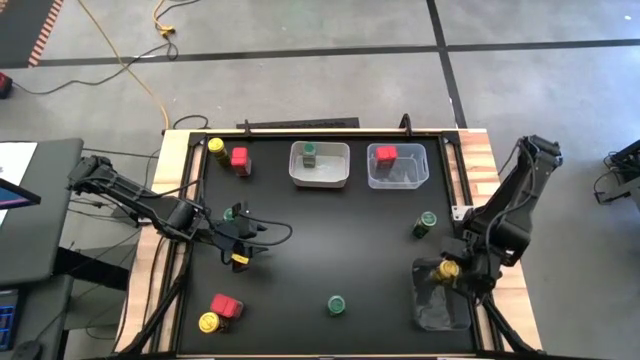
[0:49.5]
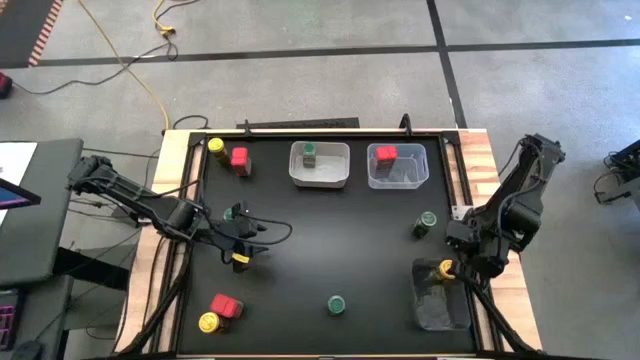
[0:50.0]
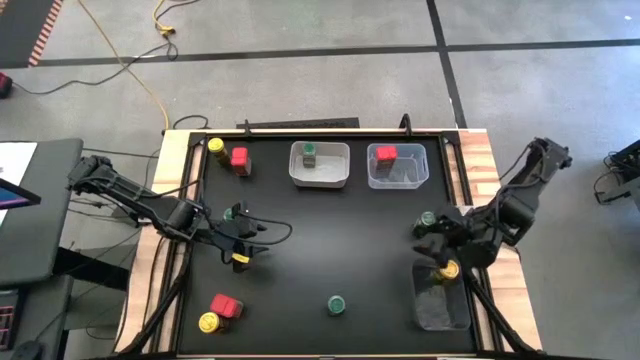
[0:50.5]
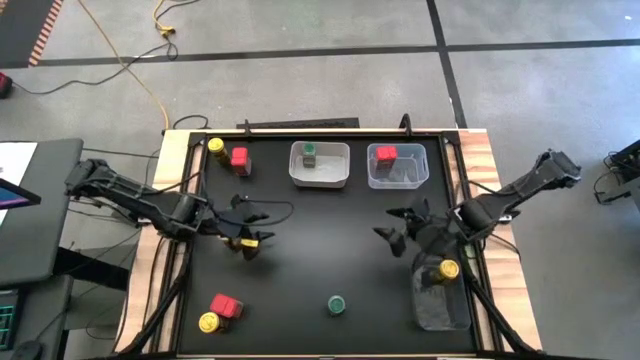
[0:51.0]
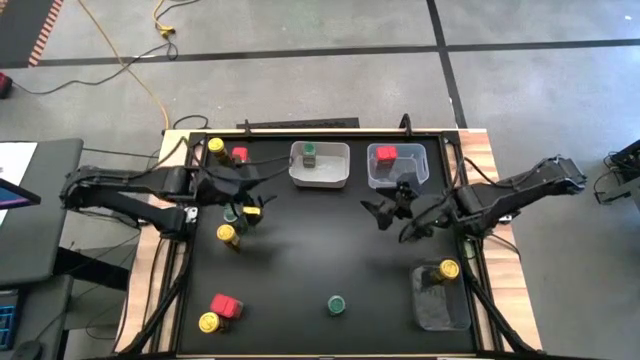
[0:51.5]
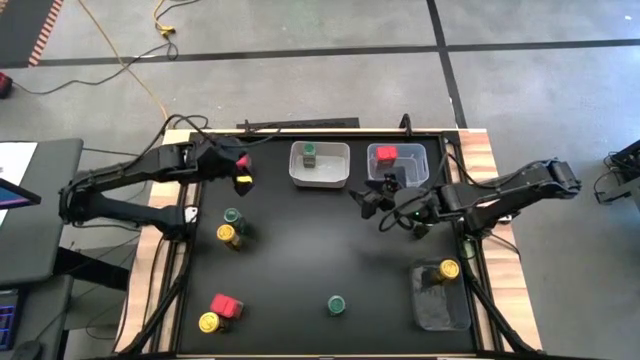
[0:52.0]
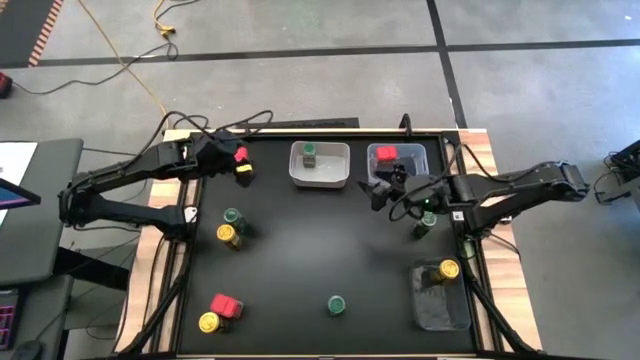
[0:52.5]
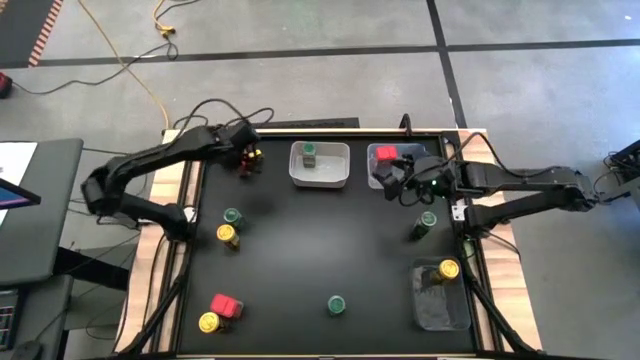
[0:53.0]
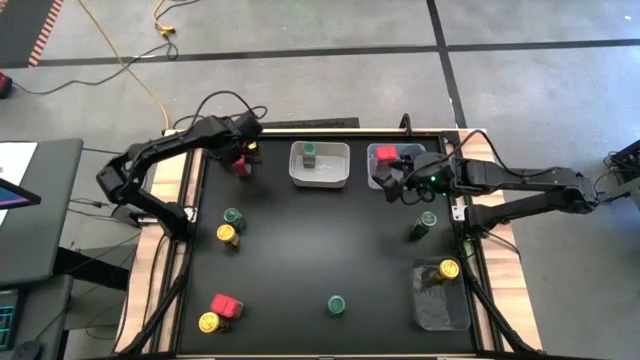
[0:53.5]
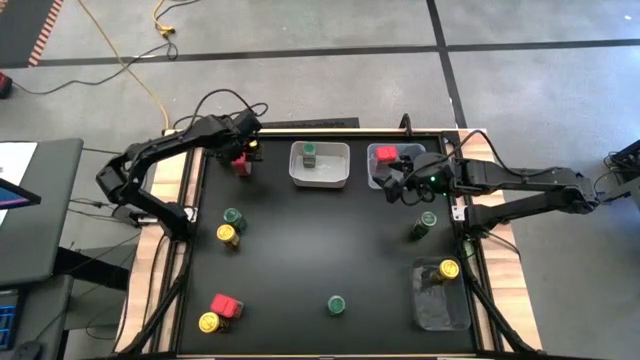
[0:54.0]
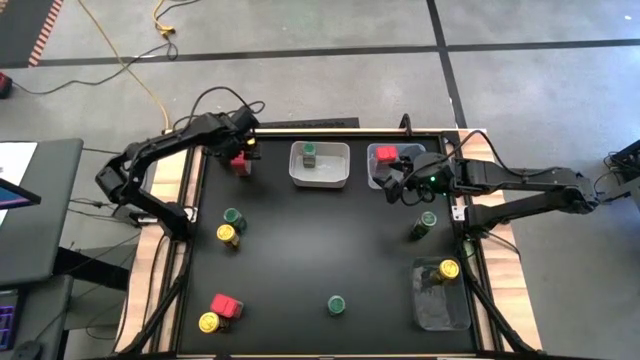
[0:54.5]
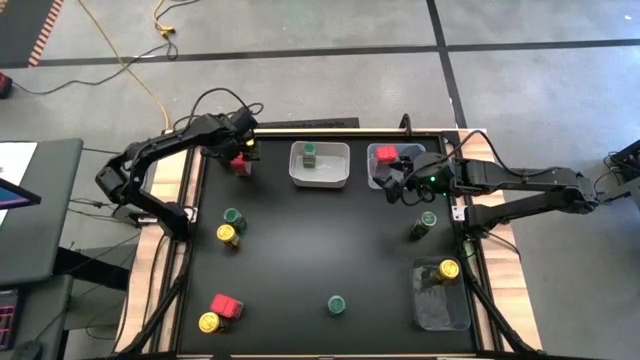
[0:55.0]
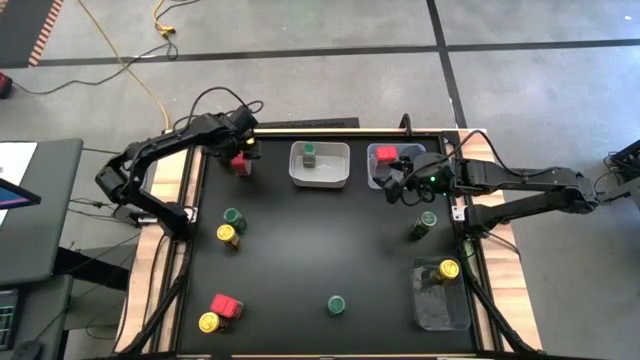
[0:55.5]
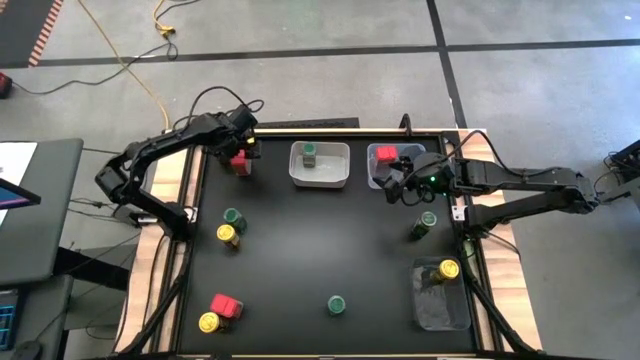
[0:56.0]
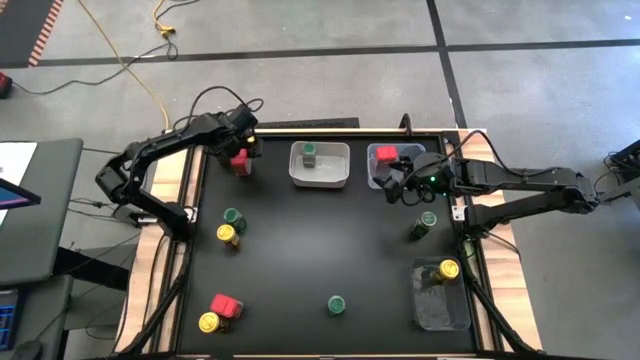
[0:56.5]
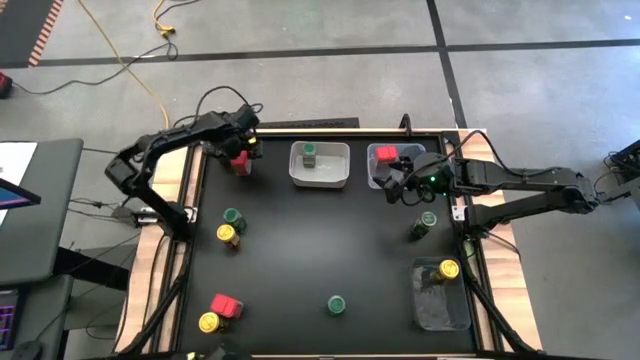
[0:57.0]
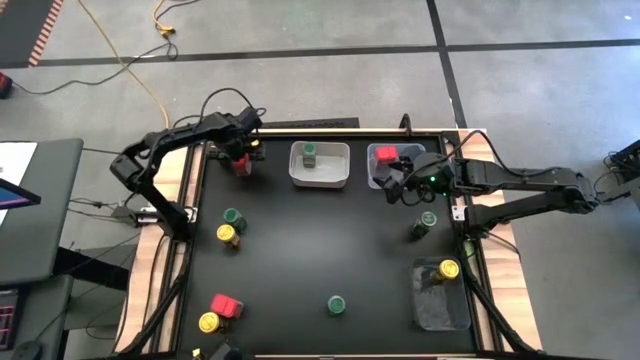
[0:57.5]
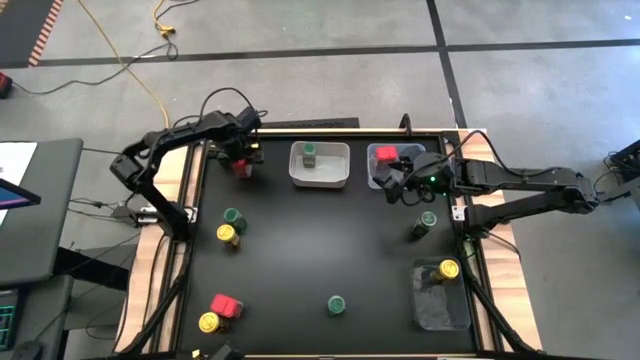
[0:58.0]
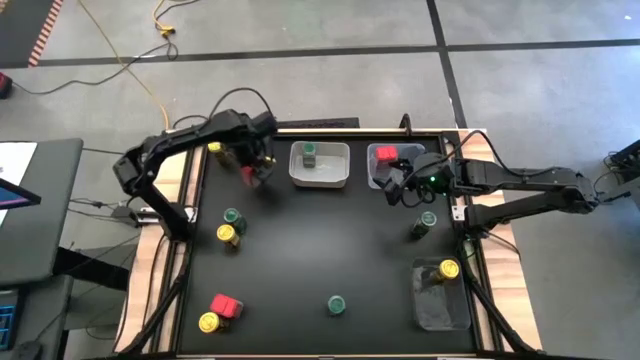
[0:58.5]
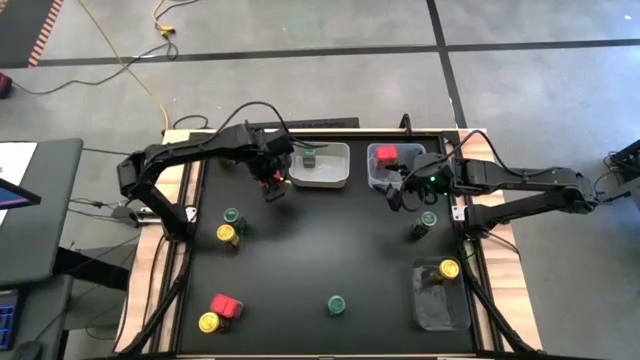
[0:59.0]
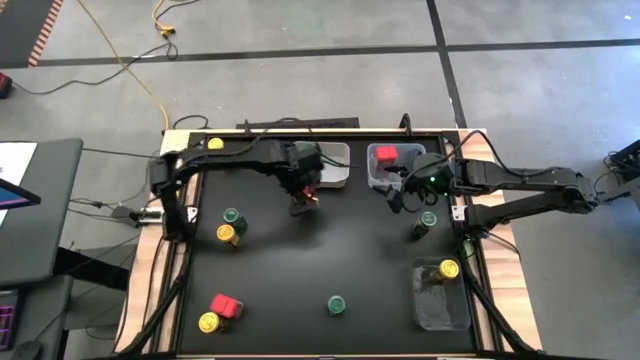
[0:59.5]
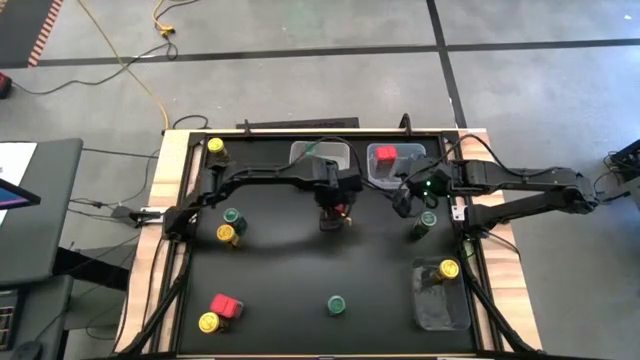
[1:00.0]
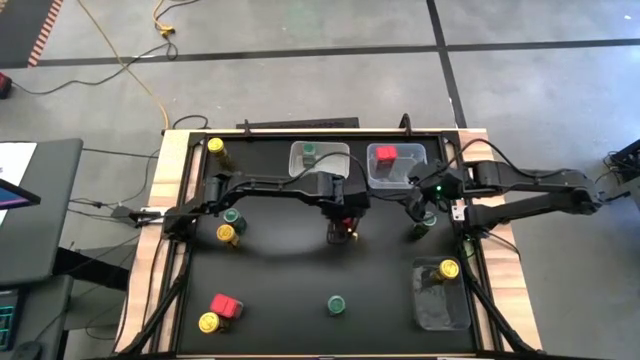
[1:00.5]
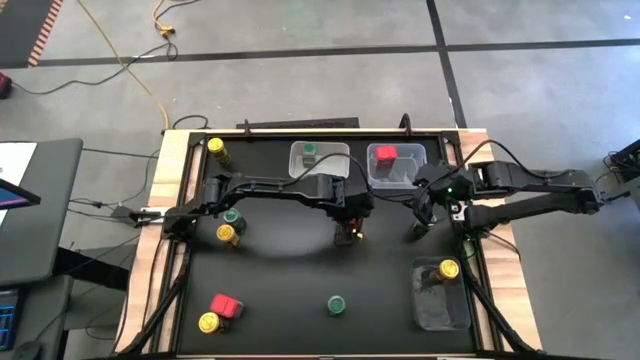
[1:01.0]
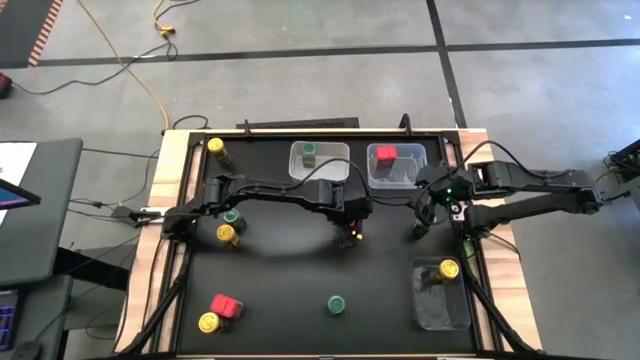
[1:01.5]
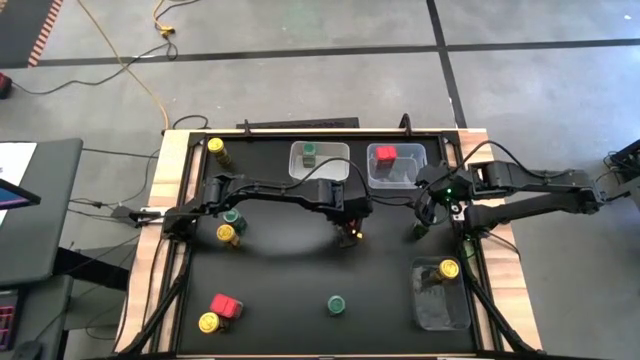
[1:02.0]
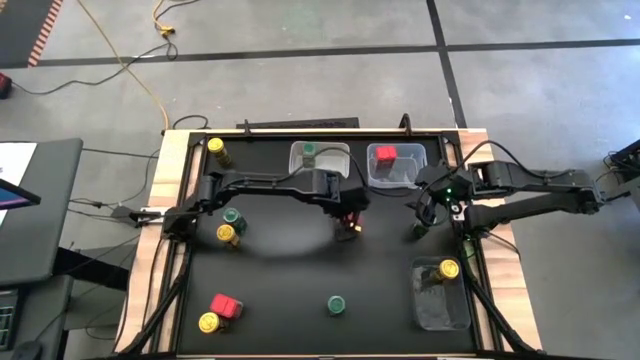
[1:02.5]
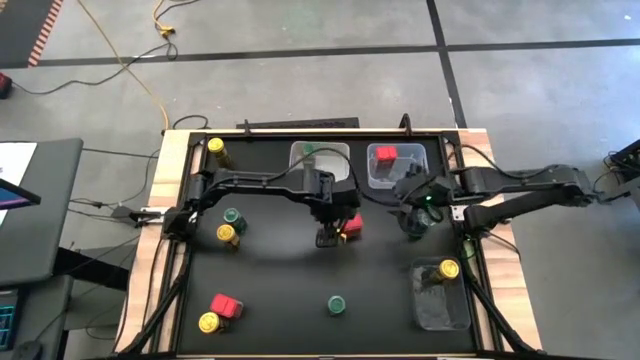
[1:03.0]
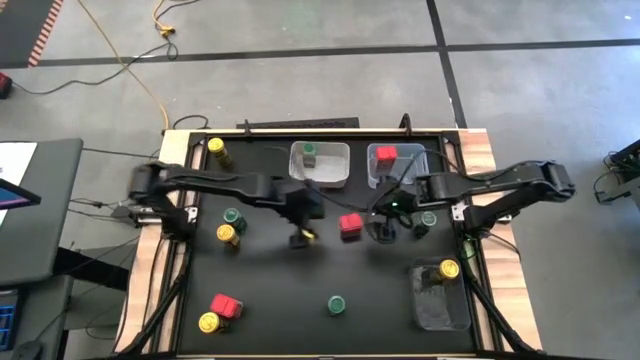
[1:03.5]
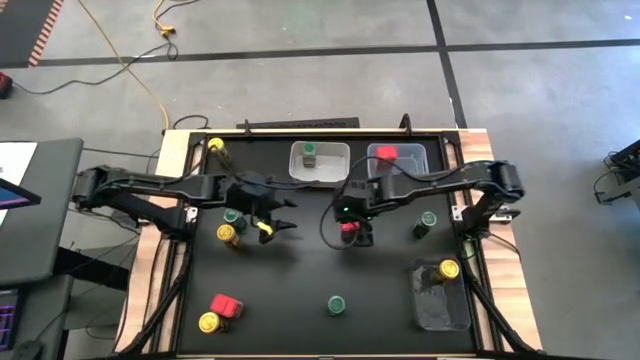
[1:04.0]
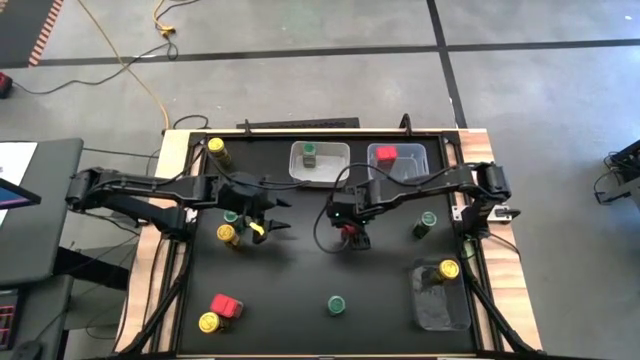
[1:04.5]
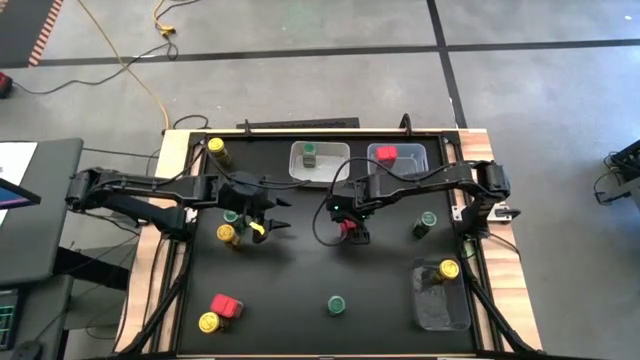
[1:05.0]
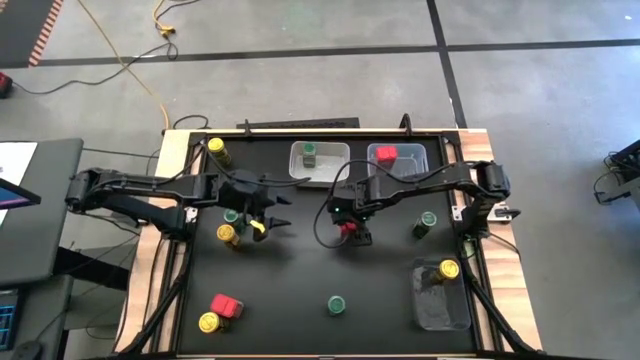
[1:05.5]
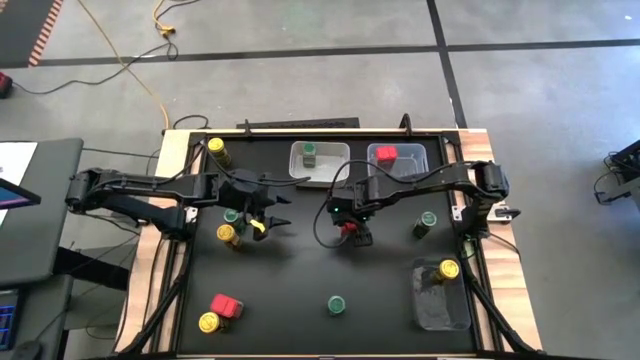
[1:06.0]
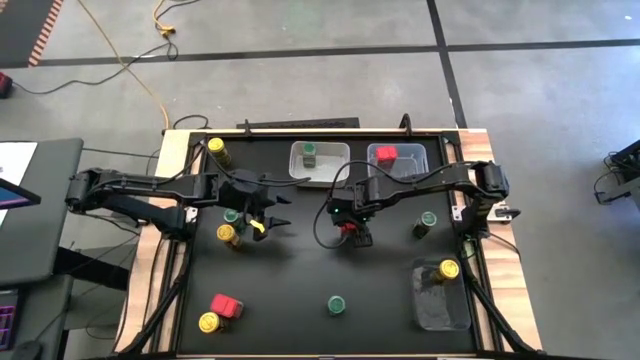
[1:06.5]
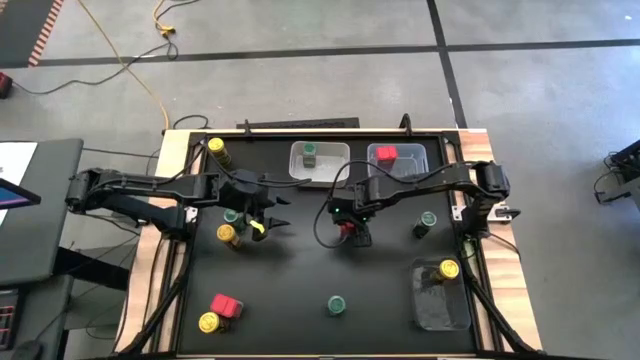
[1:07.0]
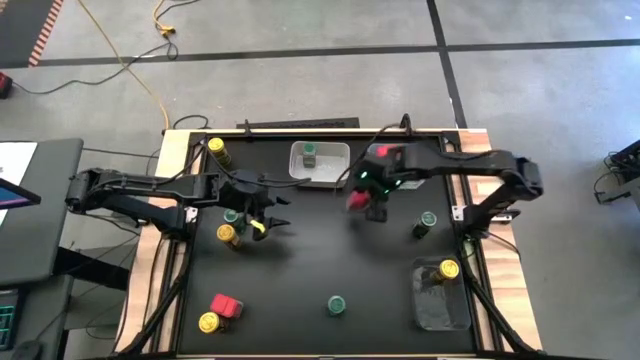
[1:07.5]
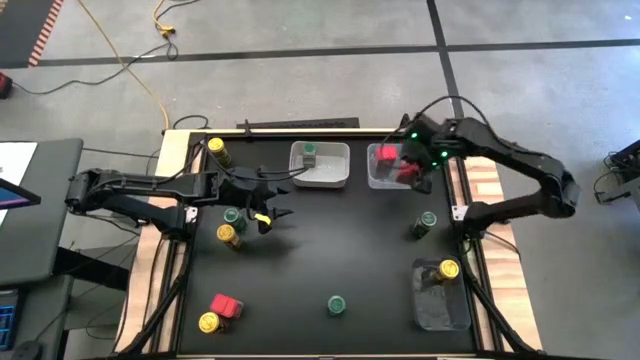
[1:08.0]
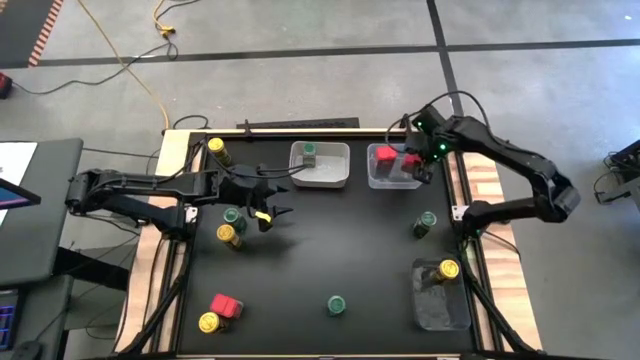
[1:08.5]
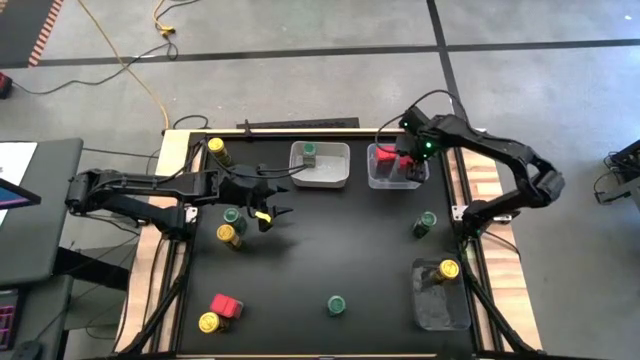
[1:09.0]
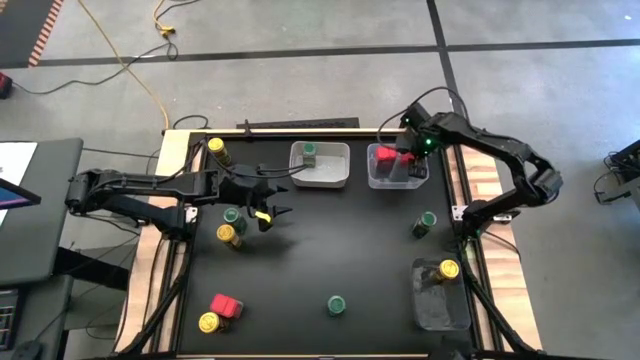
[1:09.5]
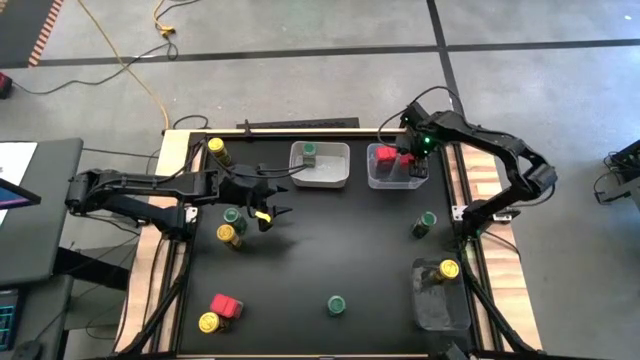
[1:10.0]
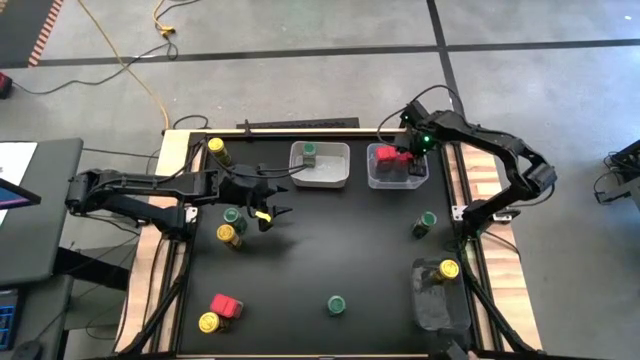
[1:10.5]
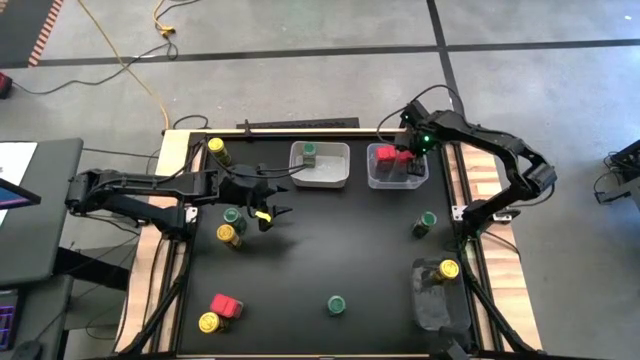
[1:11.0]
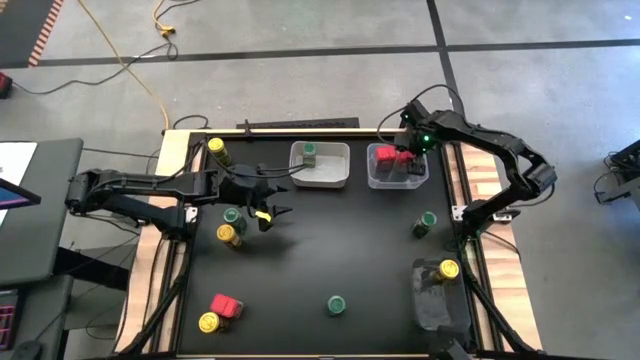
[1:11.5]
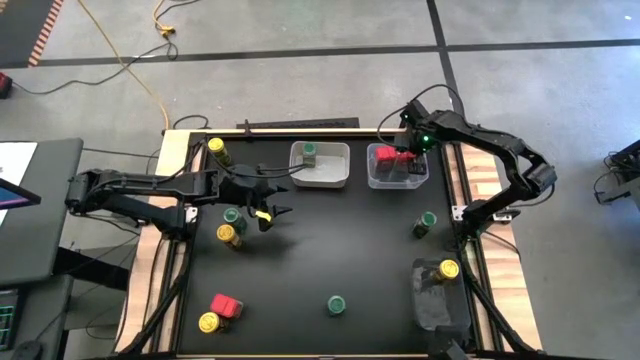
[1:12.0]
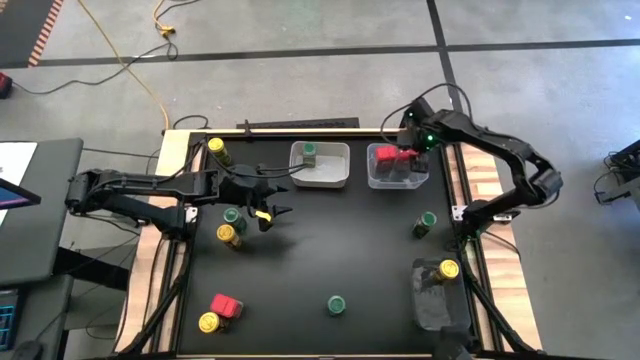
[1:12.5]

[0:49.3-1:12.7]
Task: Sort spices by type
Put the top red seasoning can into the transparent bin
